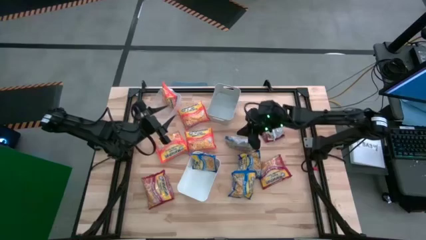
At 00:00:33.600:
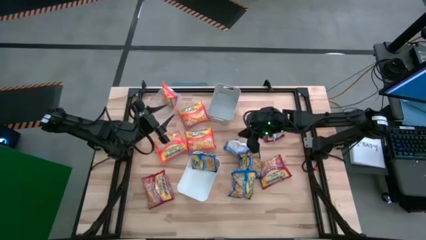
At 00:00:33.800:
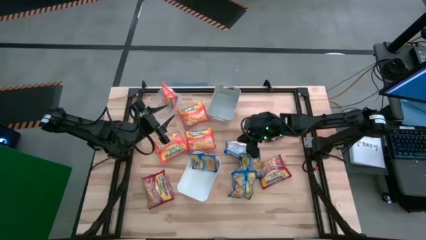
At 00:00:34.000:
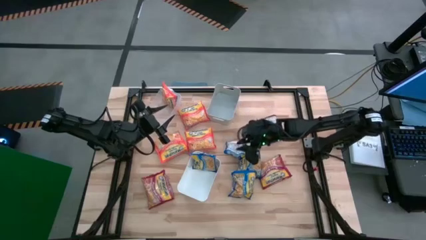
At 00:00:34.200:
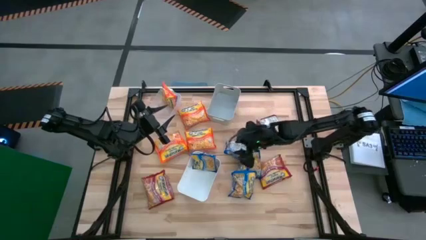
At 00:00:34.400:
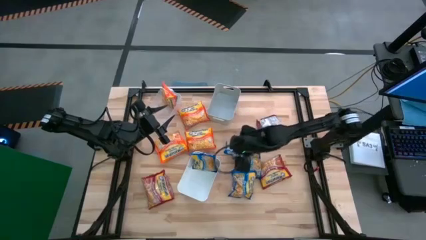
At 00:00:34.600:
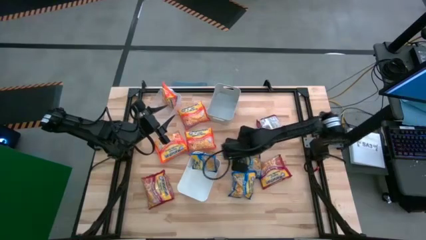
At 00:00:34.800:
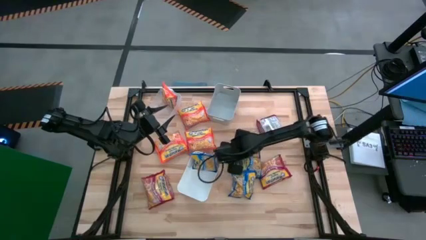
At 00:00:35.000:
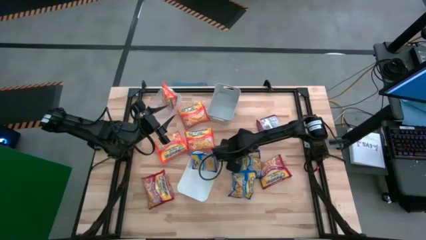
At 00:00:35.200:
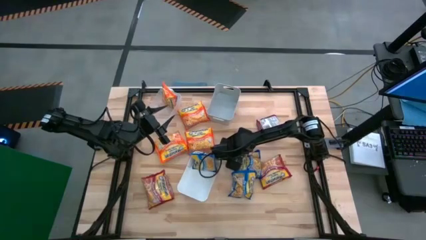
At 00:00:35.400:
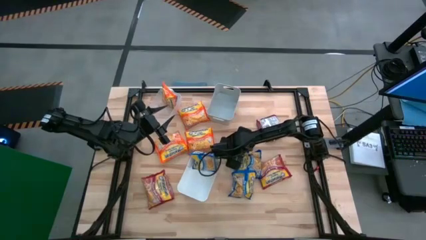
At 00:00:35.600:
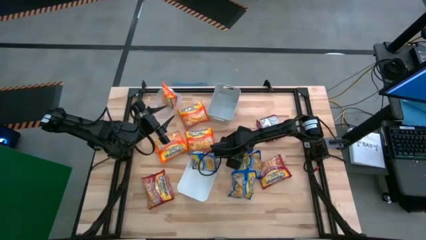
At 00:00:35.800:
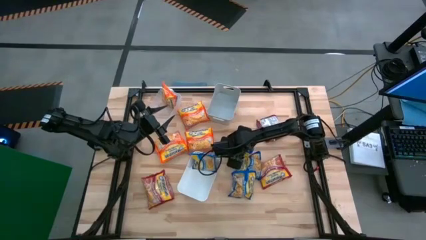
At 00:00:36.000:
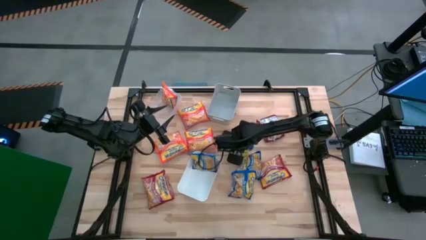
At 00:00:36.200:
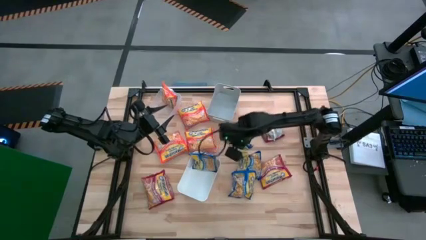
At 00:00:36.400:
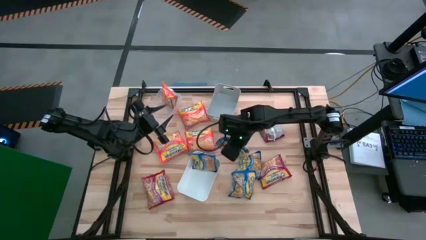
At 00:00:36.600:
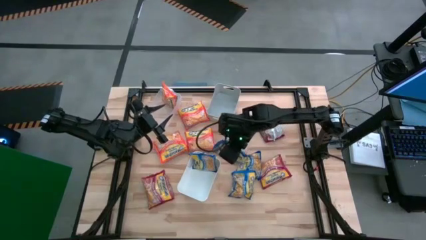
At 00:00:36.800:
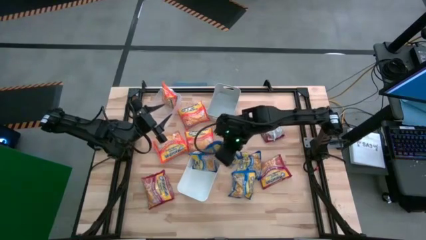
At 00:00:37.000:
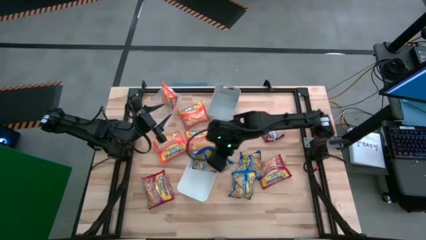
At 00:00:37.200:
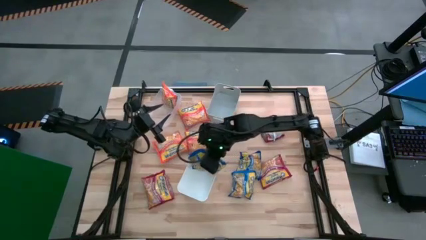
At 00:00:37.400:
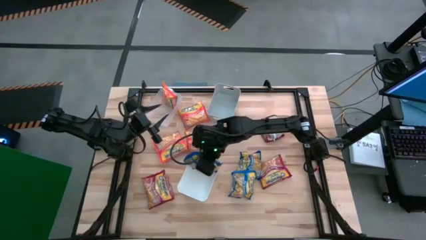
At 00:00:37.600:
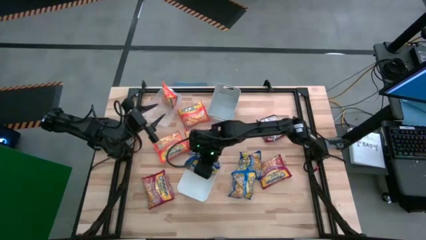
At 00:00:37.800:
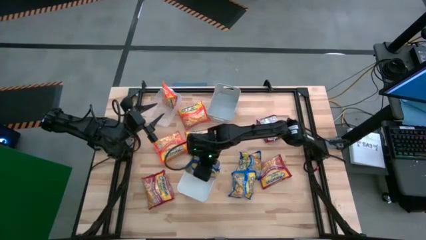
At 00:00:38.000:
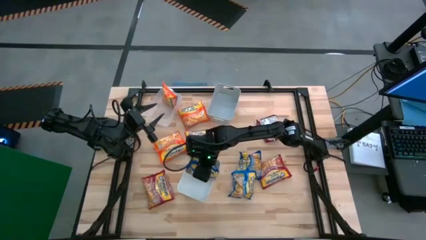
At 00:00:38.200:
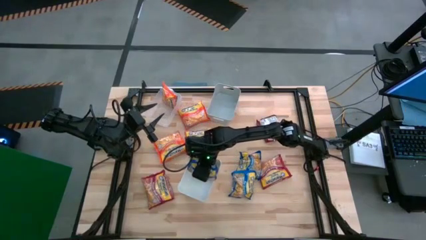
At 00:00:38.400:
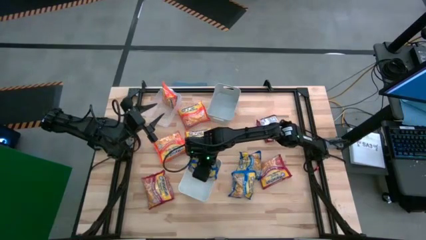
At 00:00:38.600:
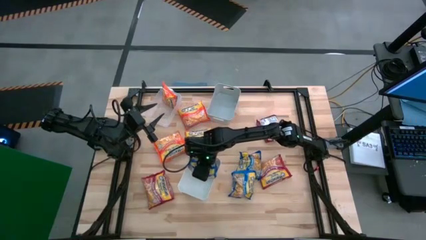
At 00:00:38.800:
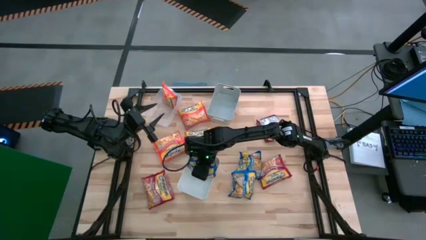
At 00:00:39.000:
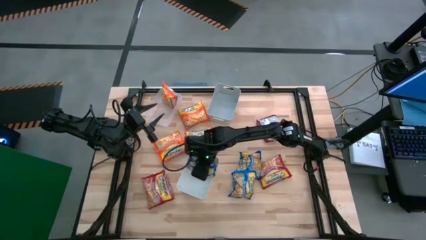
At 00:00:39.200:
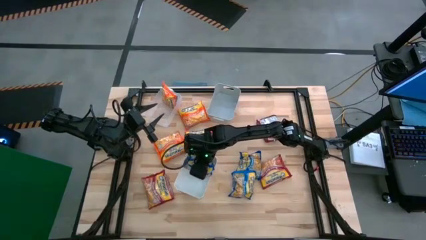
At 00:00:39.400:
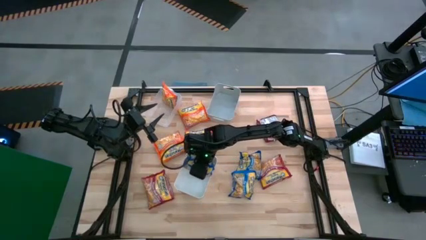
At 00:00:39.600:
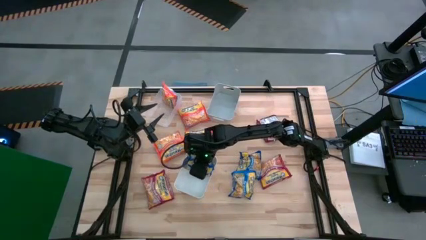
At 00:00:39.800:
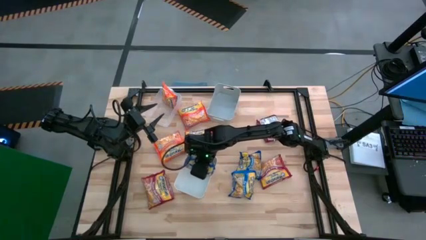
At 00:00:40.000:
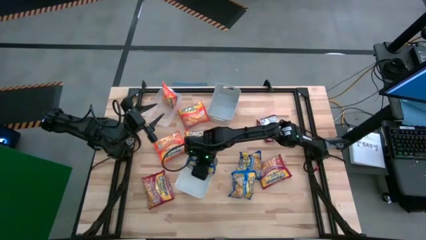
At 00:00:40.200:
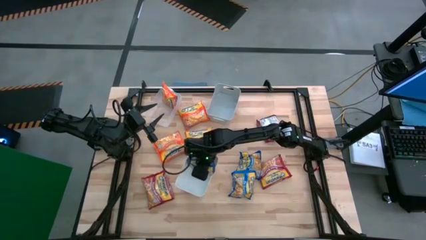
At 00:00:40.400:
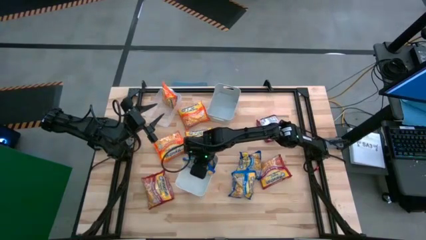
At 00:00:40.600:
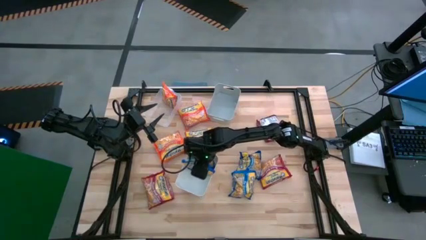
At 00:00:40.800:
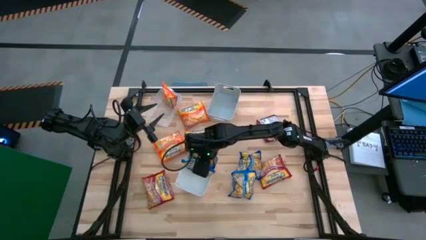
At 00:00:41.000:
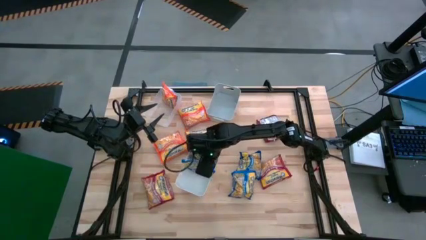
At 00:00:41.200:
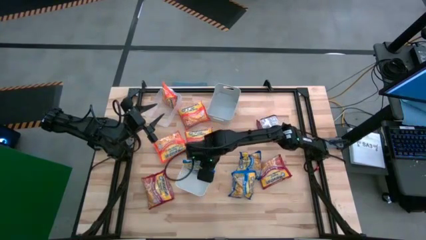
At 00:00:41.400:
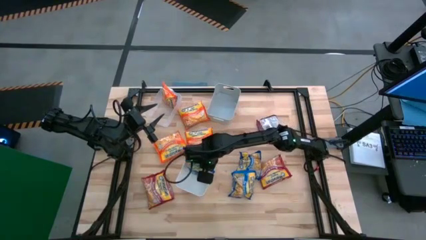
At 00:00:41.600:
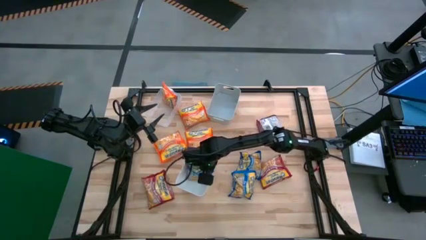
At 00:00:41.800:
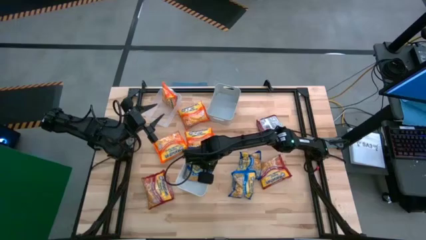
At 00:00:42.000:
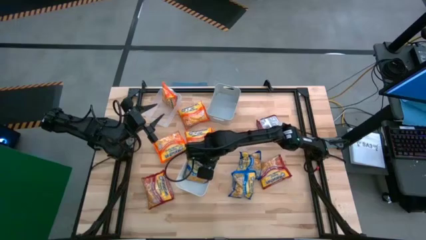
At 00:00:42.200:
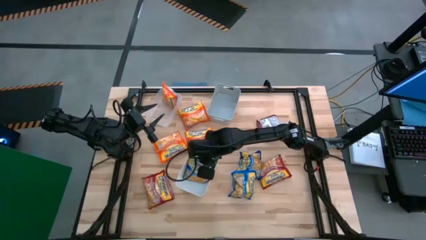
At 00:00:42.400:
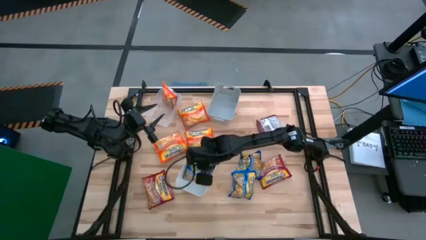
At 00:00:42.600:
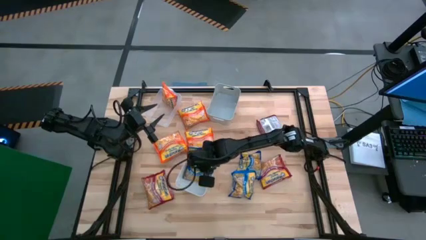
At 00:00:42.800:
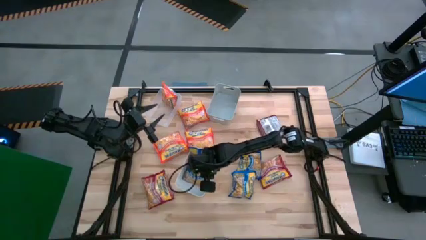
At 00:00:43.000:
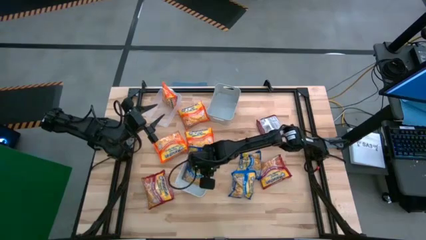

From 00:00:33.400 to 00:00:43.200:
Task: Sort Maruchan noodles
Put the blue noodle pack into the white bin
